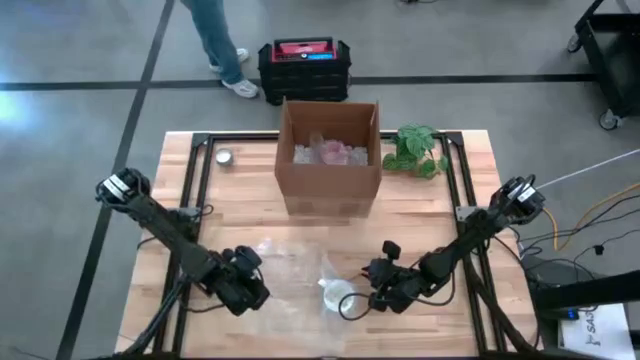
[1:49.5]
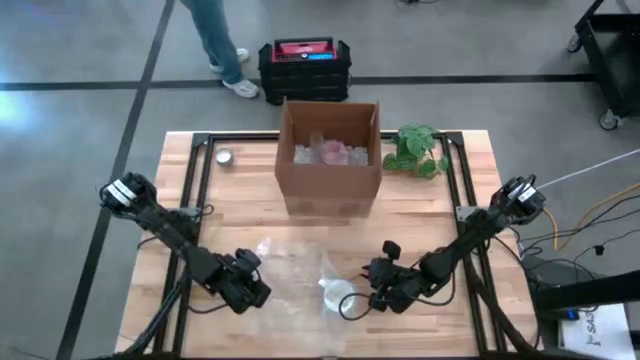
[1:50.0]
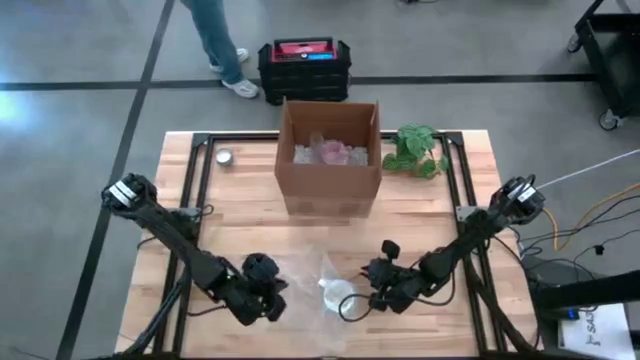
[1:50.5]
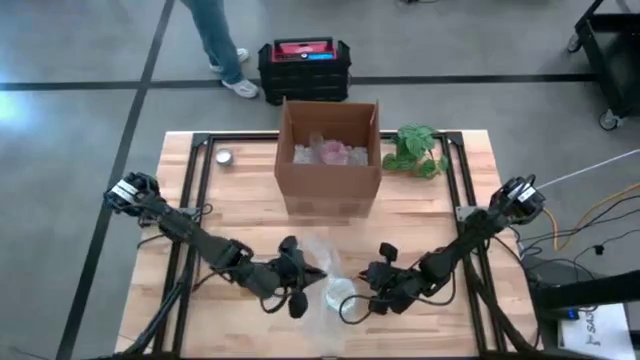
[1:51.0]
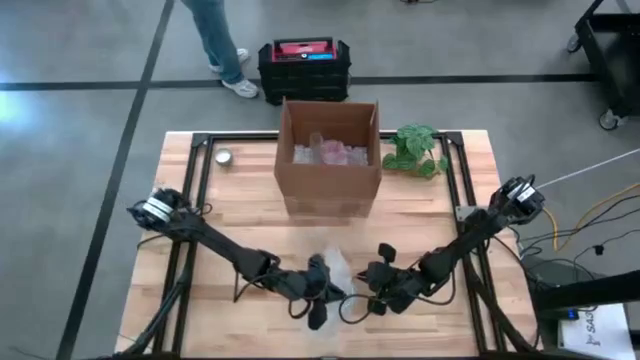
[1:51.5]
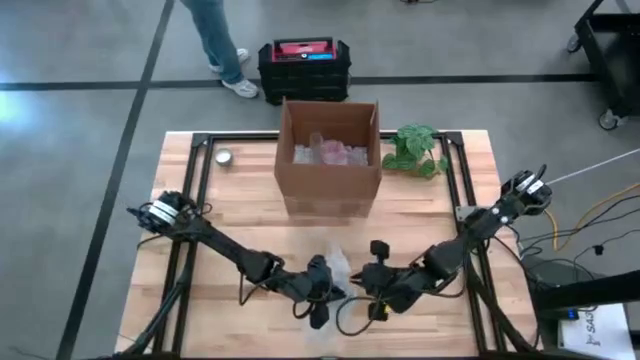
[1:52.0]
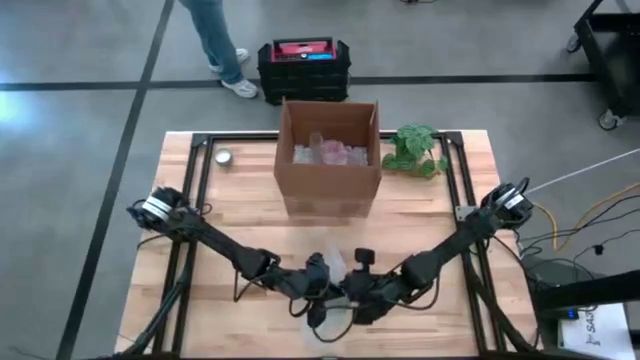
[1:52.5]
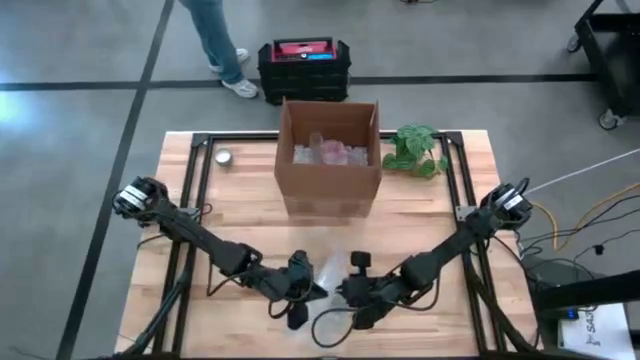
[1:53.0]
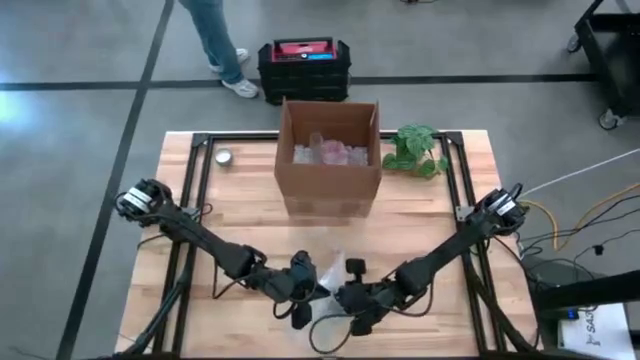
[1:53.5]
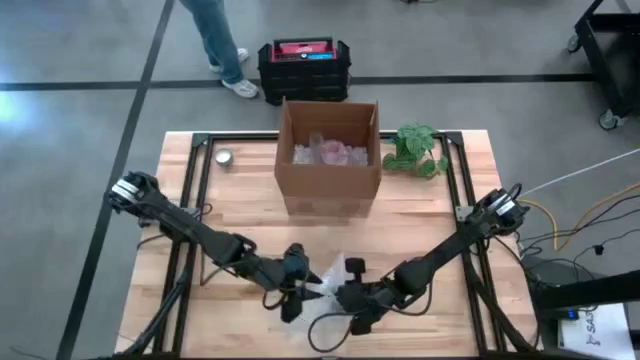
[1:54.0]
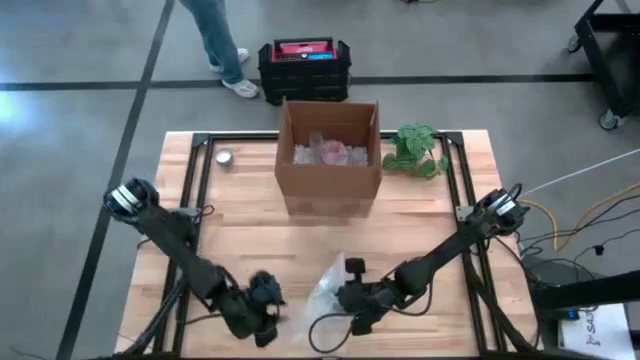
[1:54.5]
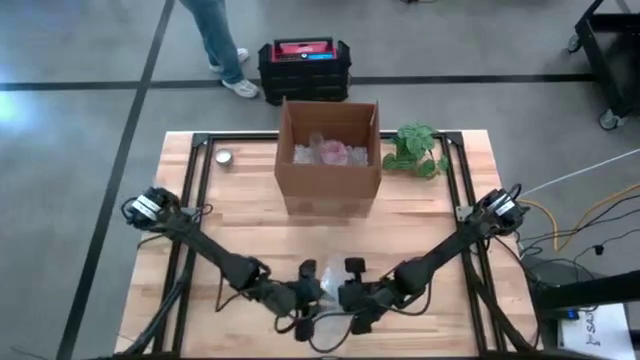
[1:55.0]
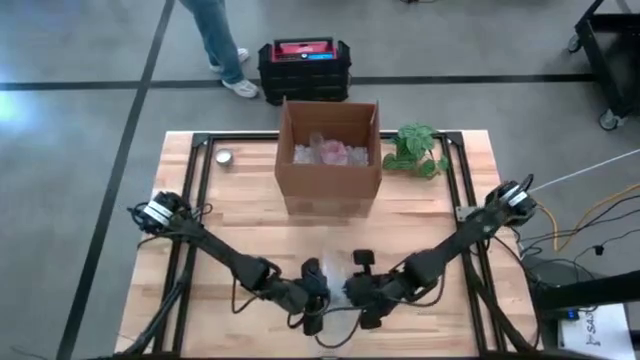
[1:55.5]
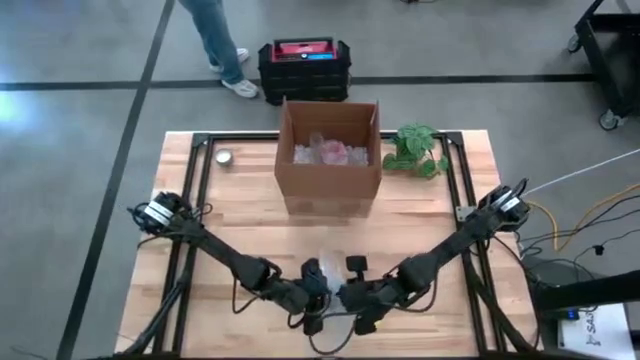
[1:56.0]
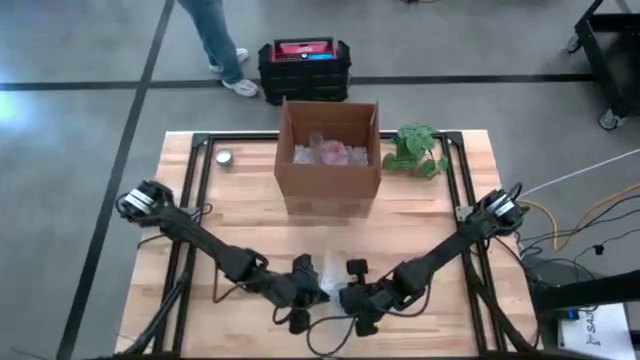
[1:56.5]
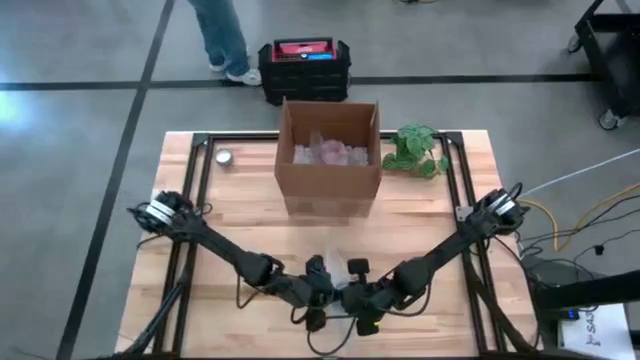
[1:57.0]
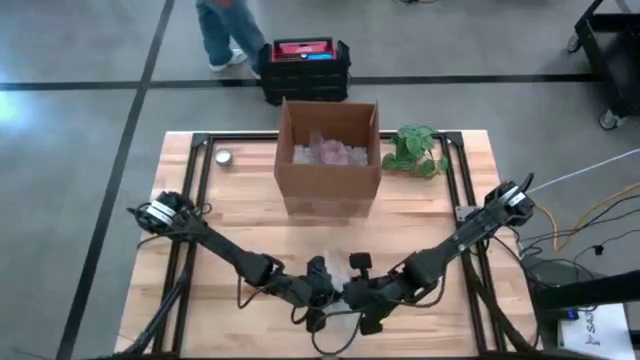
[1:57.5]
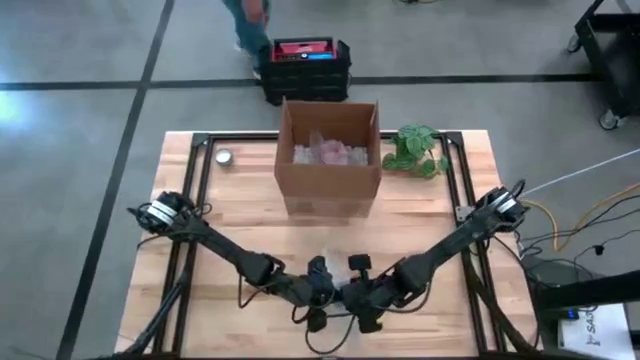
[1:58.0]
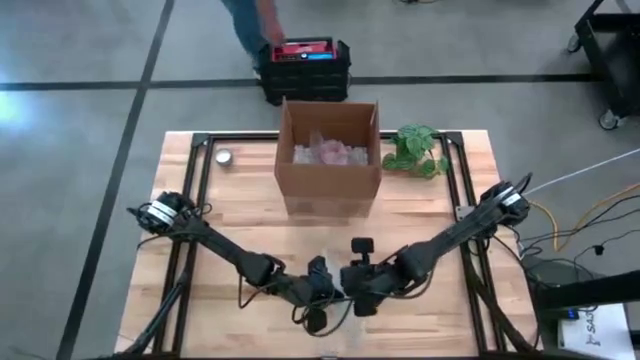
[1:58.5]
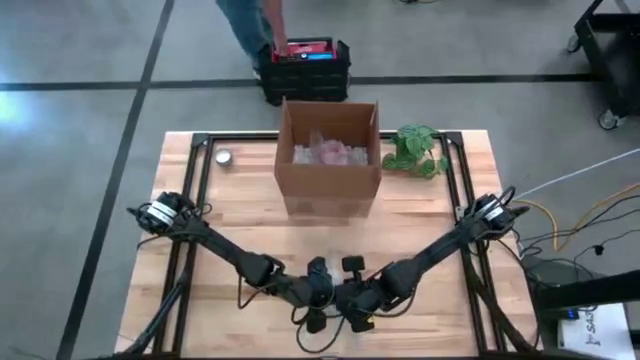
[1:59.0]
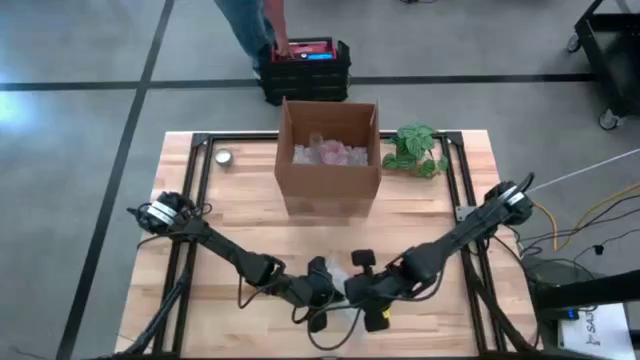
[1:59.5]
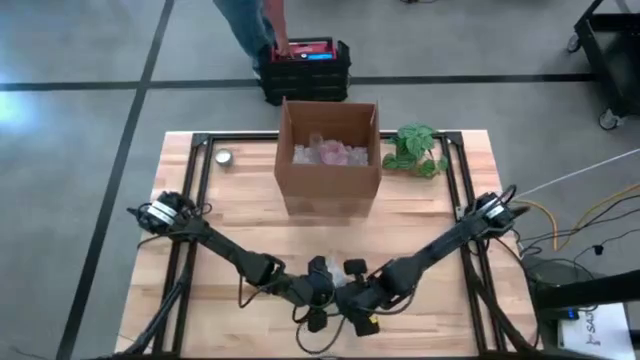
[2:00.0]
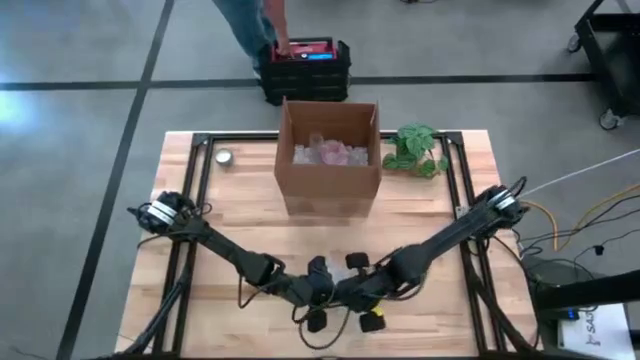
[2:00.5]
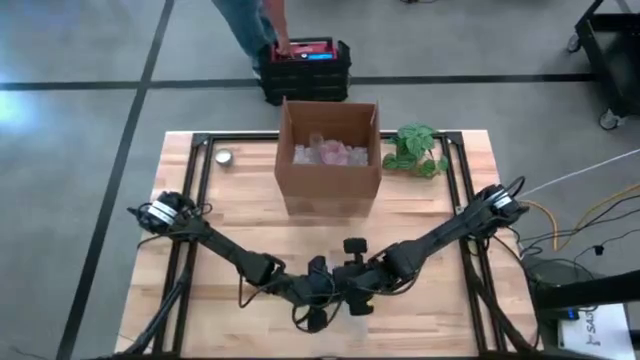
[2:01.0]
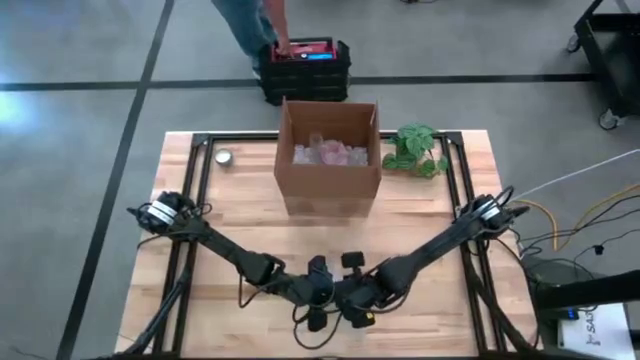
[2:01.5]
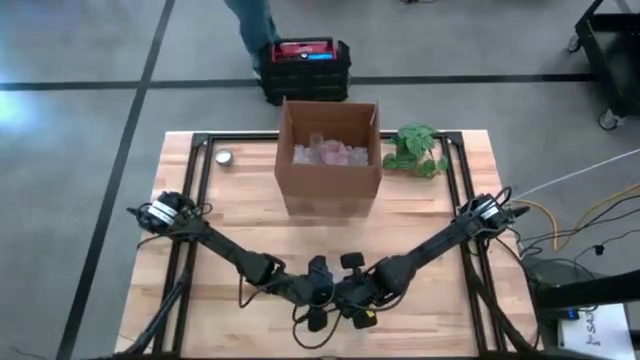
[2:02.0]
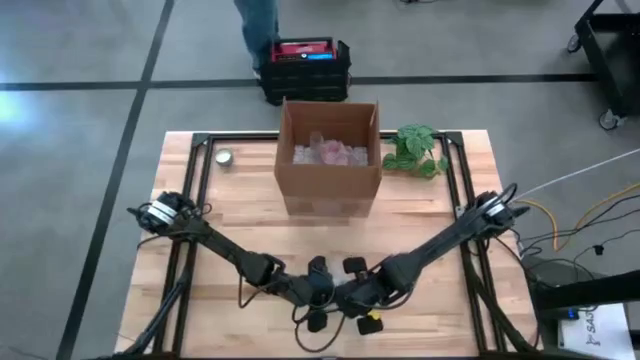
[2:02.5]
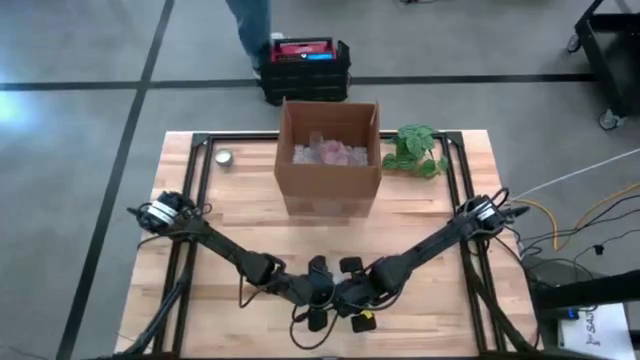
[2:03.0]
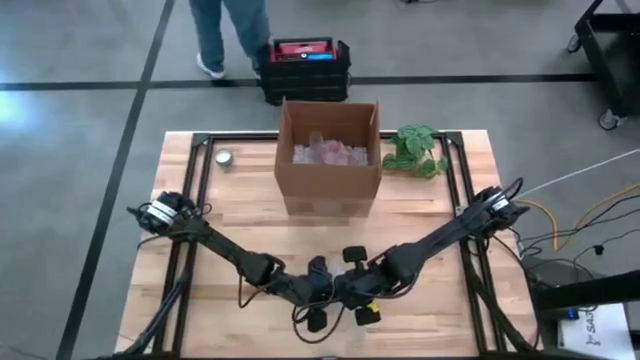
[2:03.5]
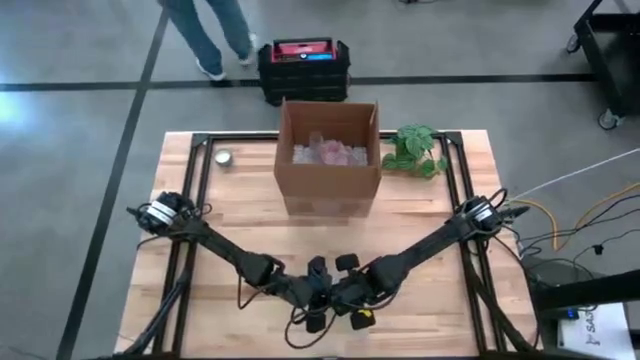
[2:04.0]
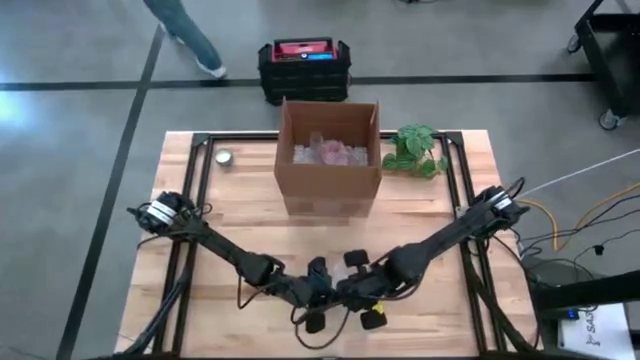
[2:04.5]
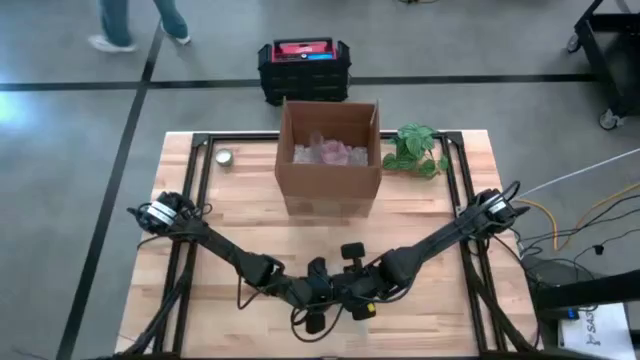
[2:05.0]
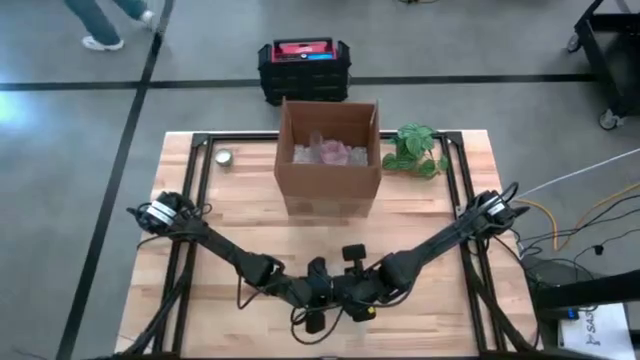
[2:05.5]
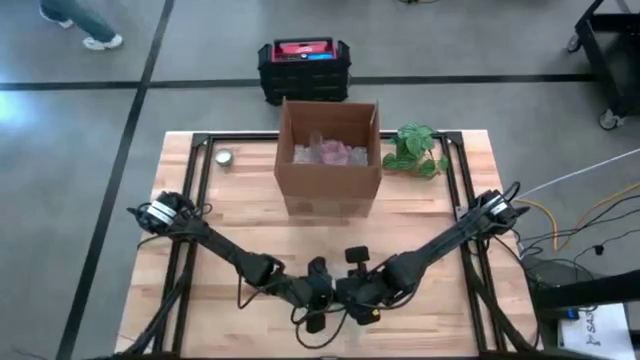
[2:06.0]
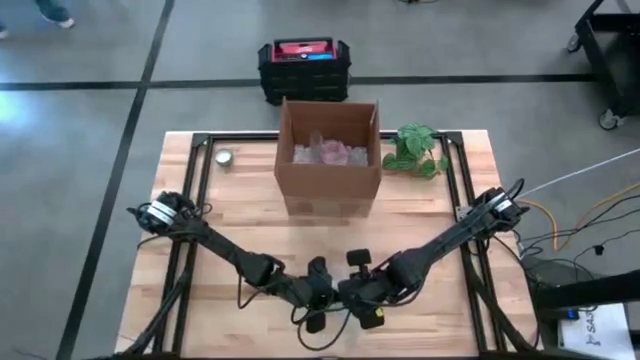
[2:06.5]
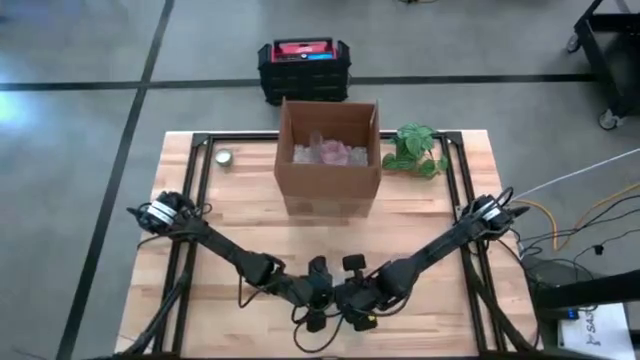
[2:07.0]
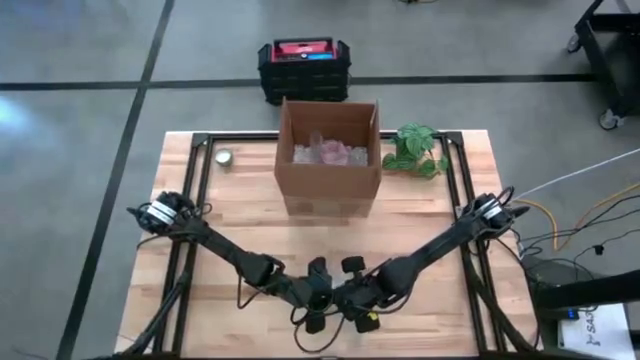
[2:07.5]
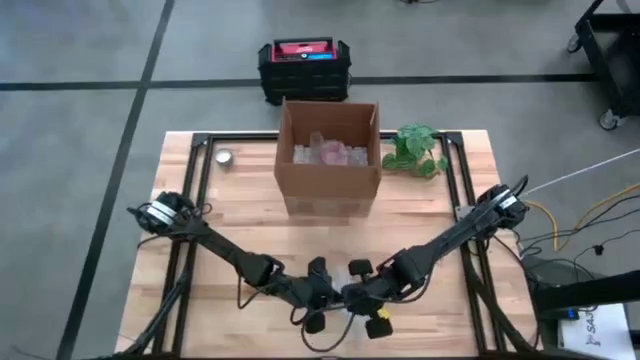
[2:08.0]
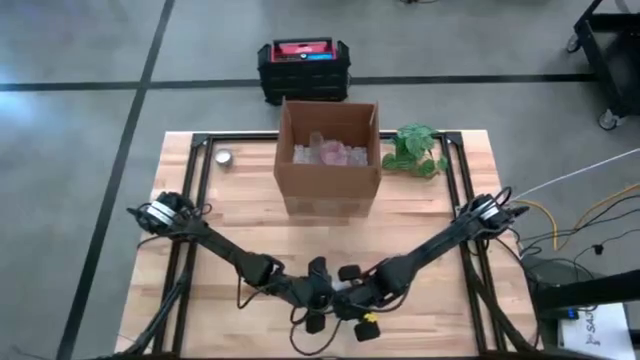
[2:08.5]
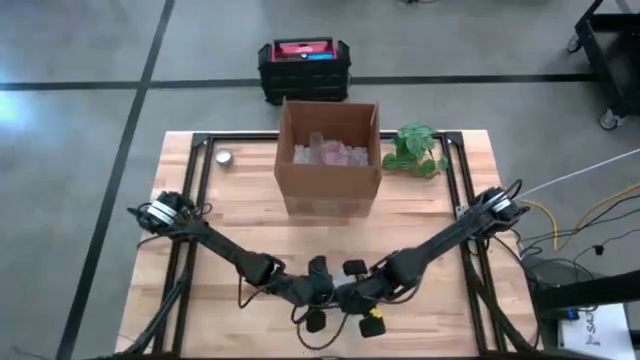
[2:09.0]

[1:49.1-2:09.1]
Task: wrap mug
Wrap the white mug in bubble wrap
